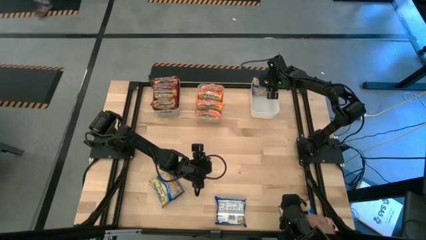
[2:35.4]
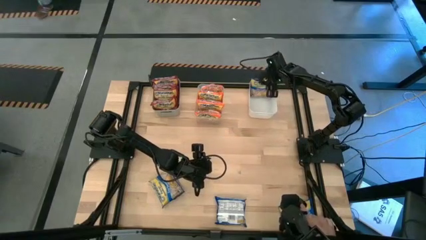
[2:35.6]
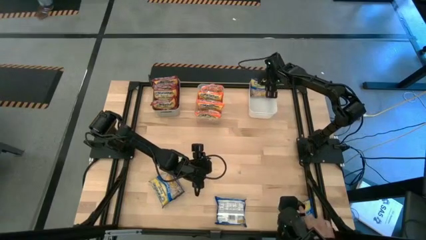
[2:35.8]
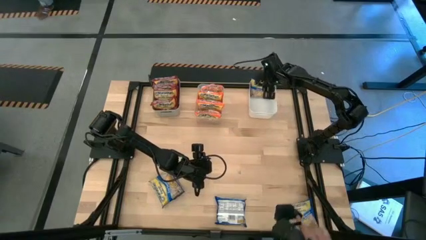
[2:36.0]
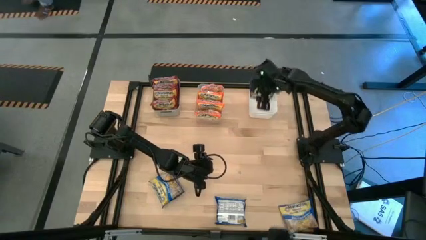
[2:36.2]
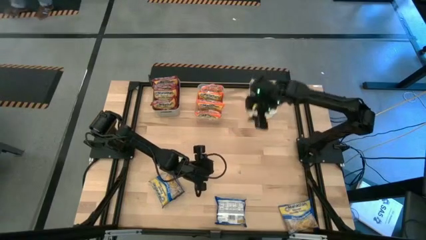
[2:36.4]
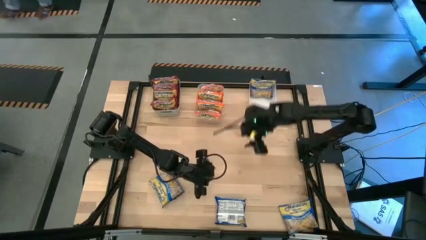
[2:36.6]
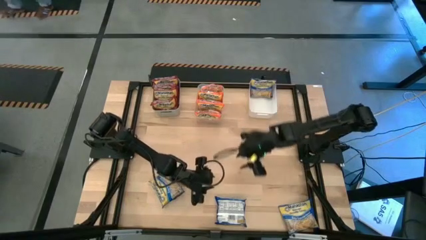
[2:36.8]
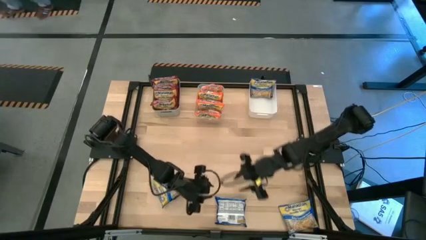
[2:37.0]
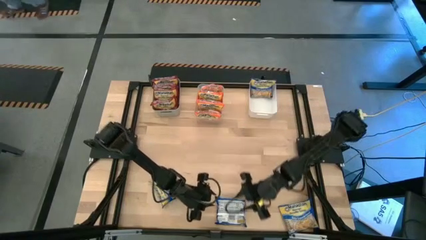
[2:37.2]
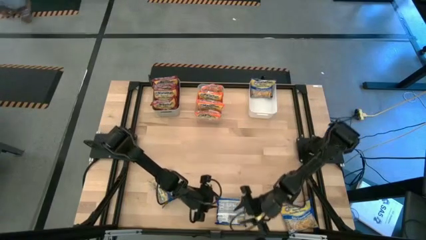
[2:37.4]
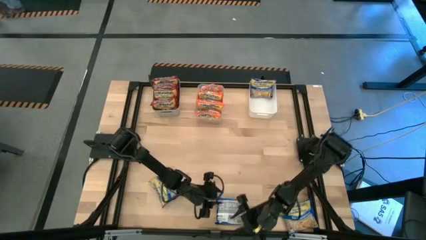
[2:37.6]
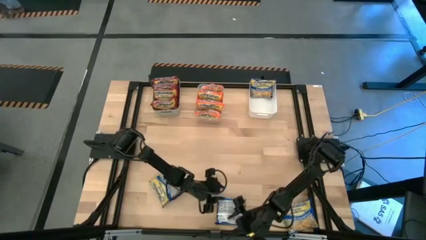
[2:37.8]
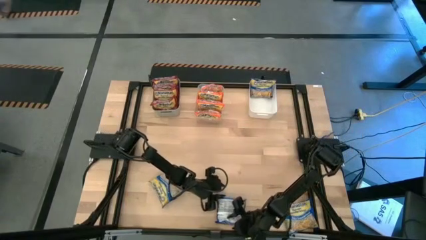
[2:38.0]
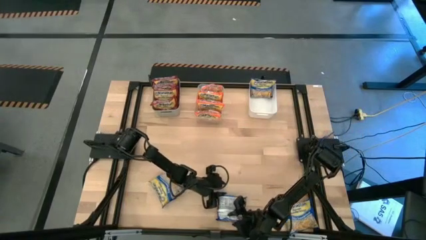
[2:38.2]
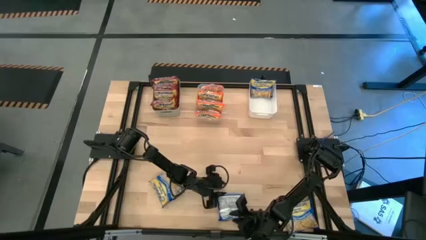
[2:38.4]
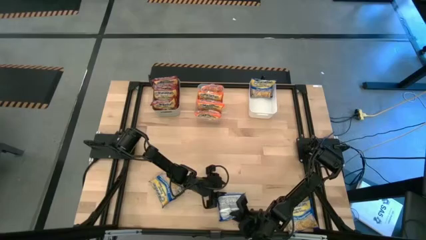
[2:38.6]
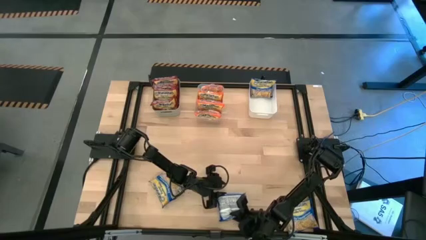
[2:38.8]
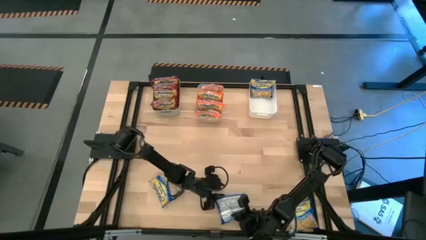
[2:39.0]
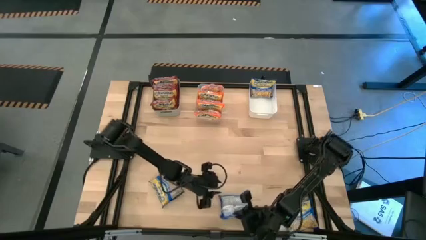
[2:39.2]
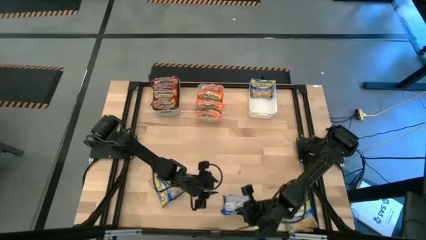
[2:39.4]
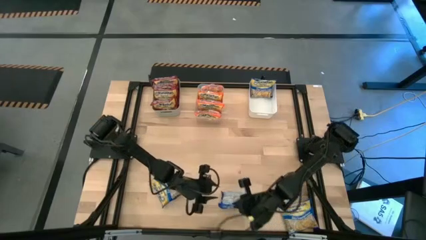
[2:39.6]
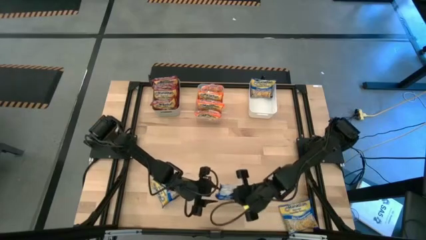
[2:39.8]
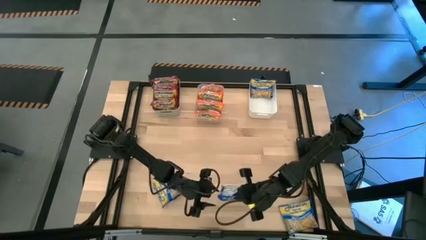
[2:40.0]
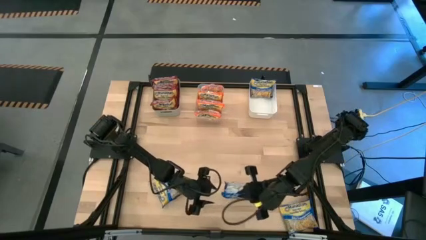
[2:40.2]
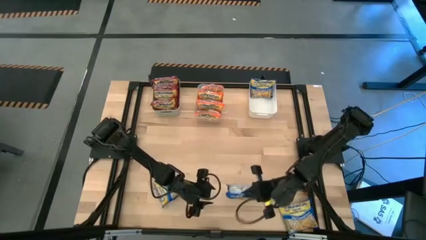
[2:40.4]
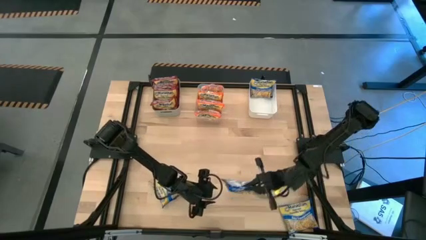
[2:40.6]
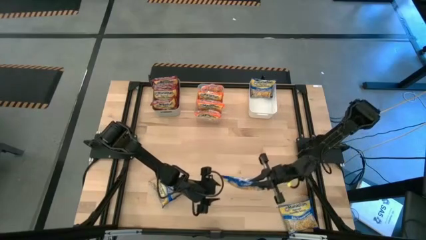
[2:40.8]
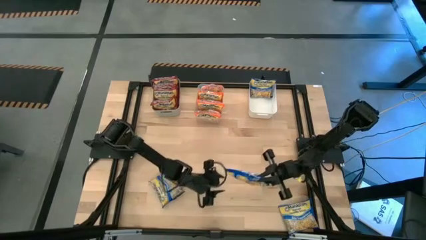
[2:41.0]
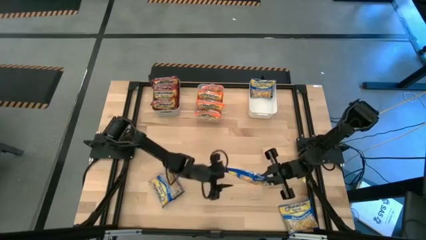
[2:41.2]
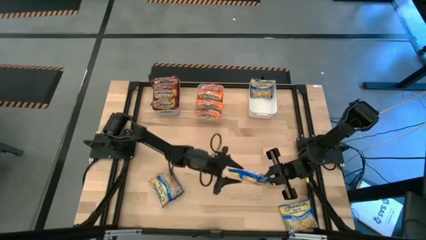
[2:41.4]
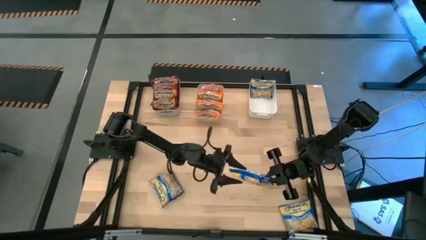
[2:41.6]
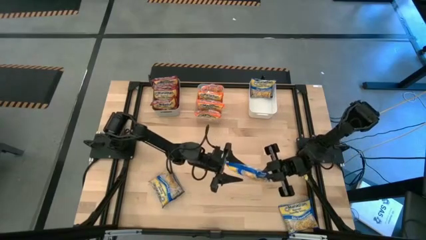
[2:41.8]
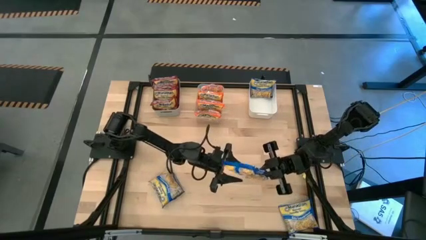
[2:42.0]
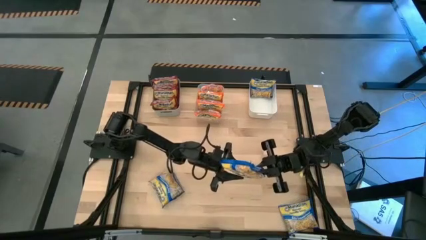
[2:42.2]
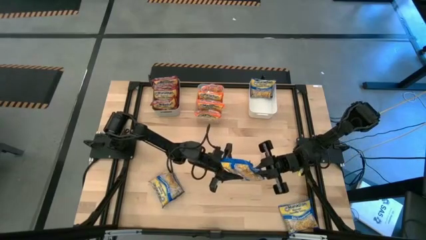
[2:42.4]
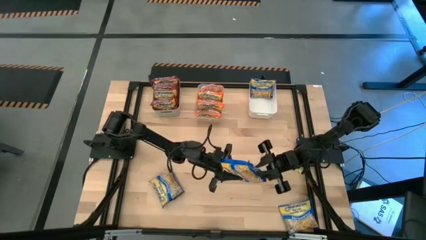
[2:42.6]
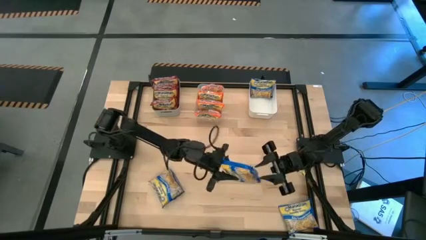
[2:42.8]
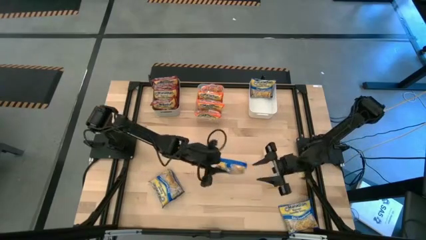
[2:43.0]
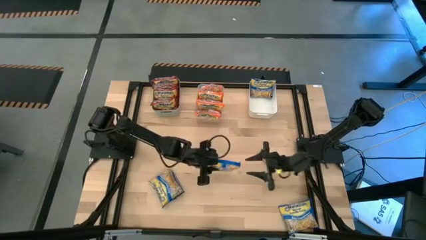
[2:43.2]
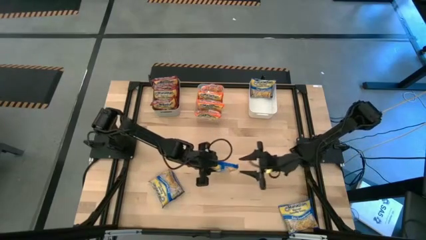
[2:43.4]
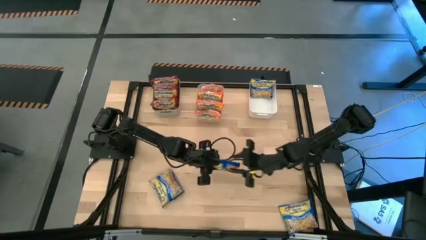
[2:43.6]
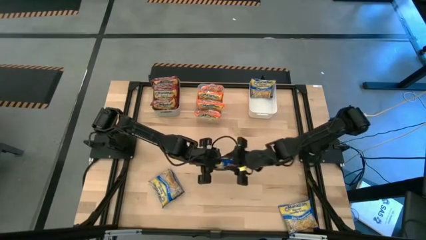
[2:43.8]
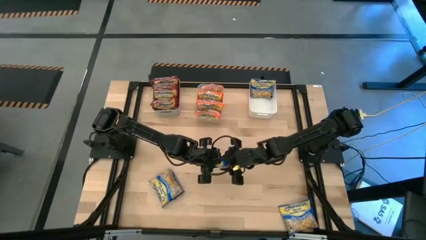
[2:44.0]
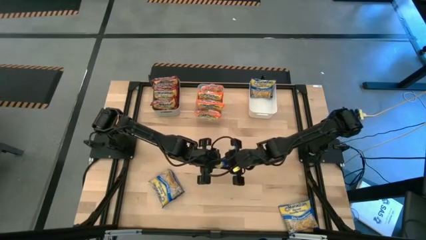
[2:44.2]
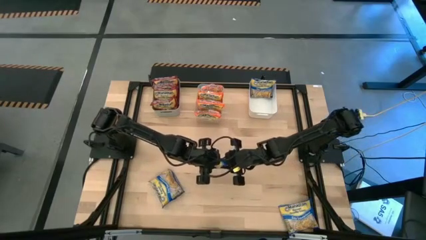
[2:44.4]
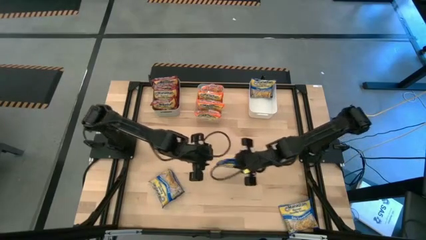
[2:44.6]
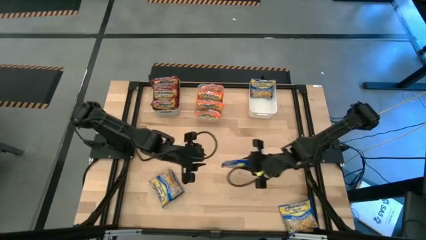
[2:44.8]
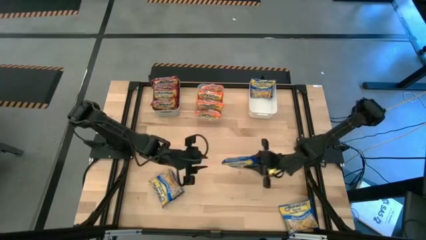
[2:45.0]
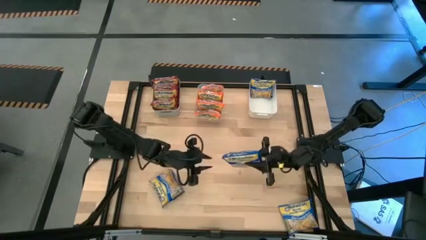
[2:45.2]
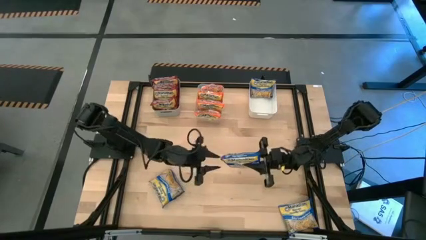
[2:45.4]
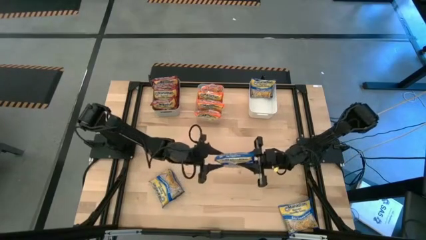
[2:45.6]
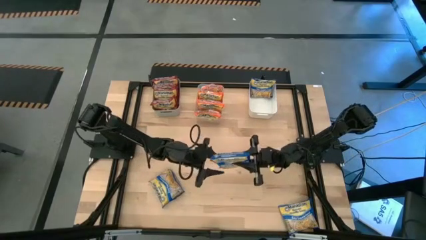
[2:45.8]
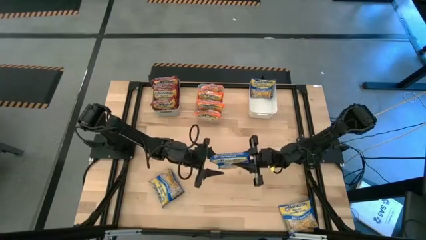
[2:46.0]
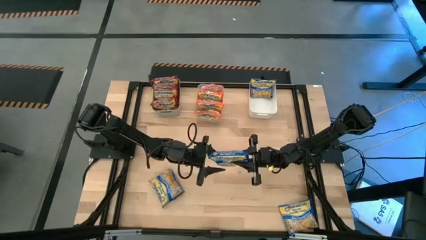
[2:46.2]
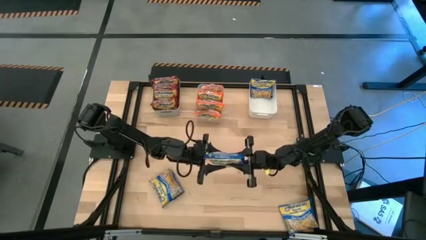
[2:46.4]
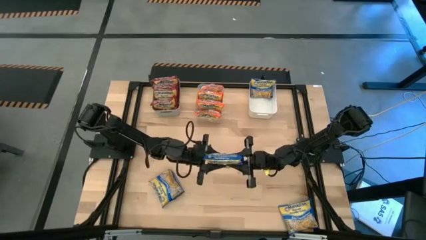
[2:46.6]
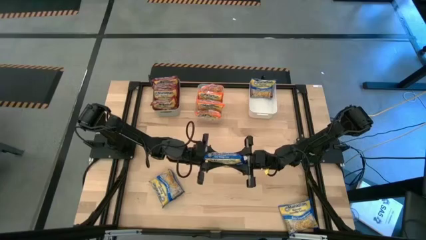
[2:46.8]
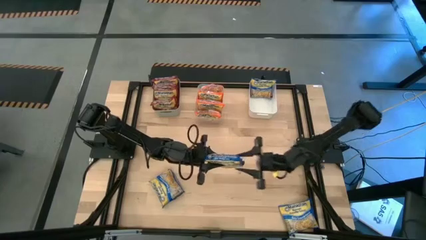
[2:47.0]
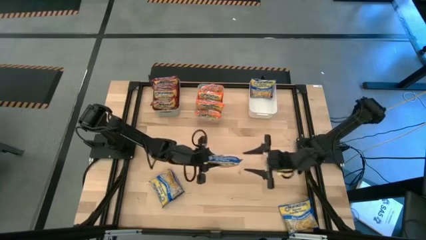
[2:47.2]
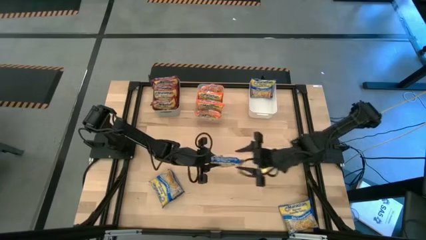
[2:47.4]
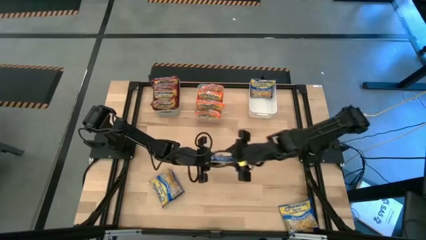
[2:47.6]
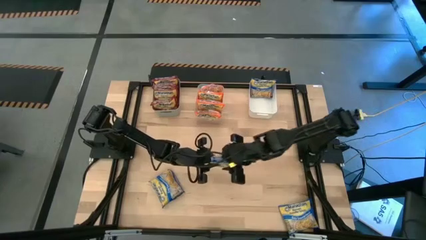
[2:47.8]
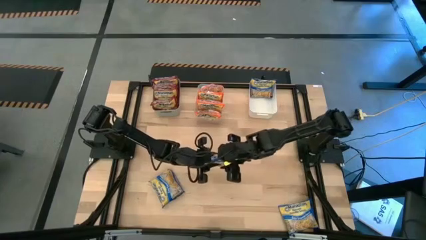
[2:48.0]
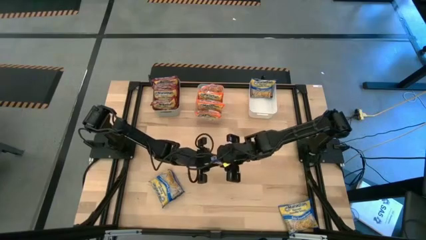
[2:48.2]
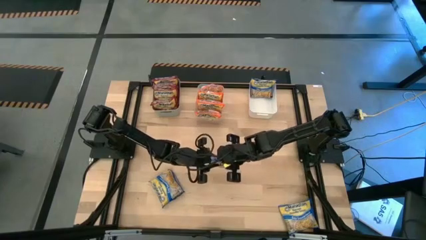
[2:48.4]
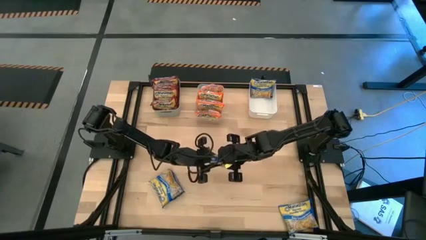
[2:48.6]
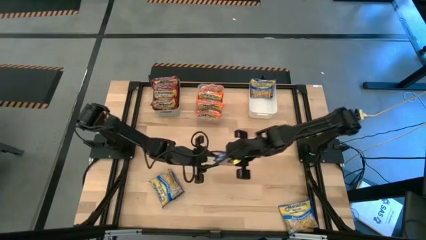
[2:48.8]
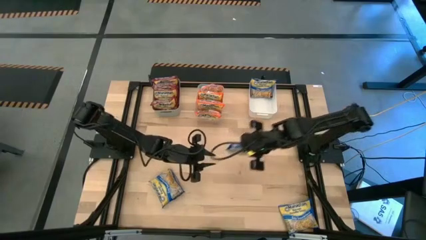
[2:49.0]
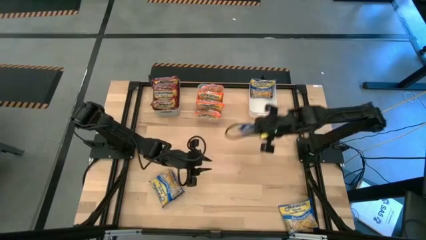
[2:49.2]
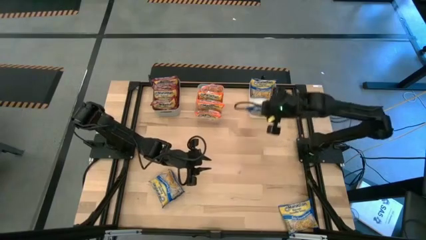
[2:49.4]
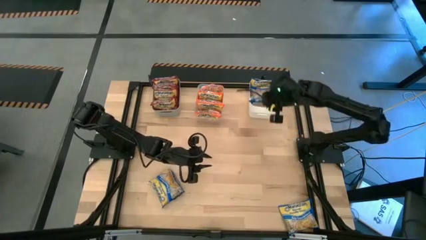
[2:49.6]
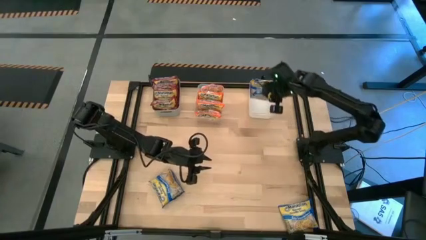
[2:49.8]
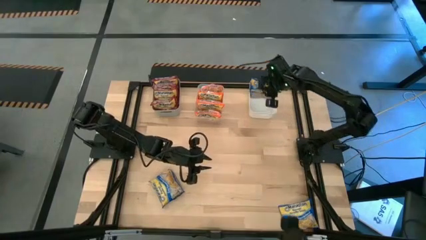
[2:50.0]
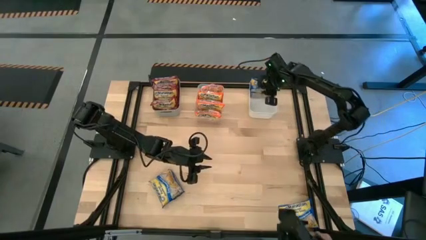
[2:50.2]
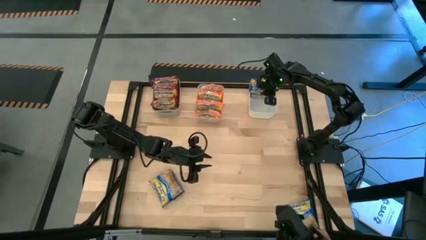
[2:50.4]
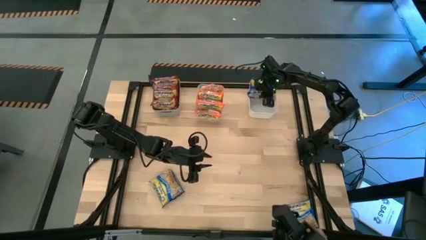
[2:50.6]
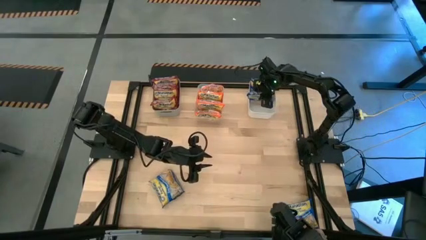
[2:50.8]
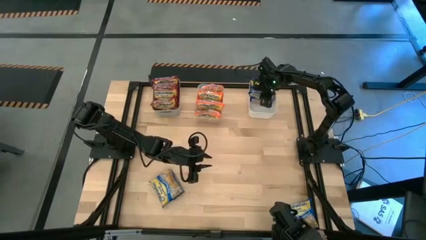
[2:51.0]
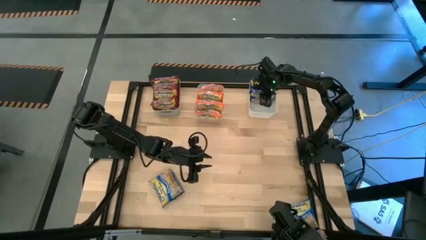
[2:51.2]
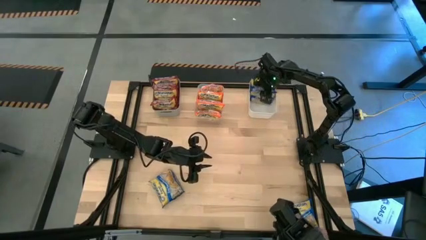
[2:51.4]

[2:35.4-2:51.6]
Task: Sort Maruchan noodles
Put the middle blue noodle into the white bin
